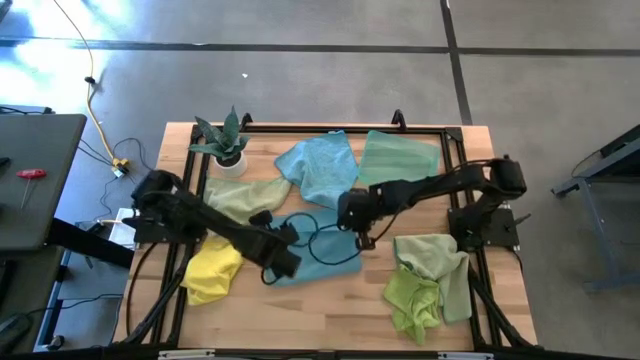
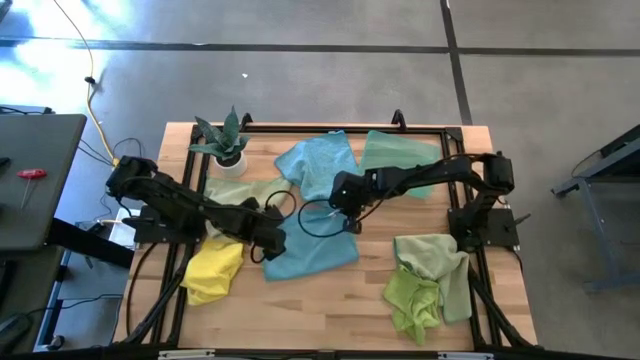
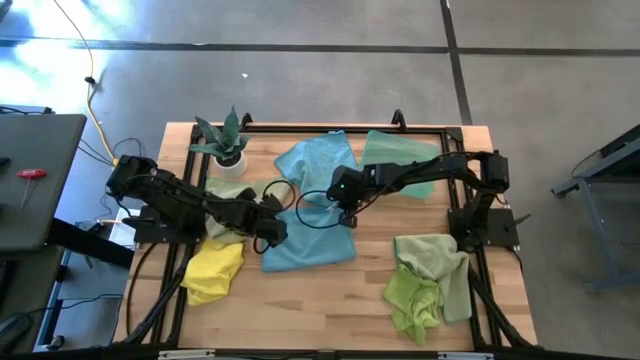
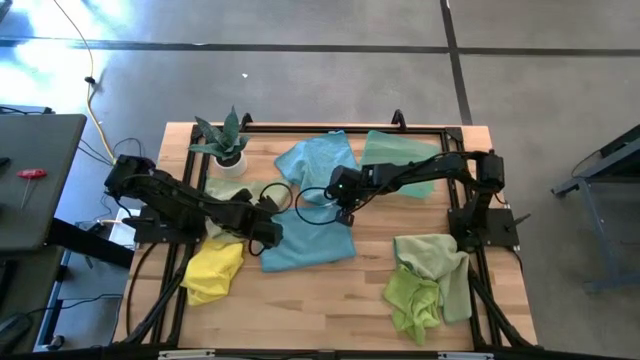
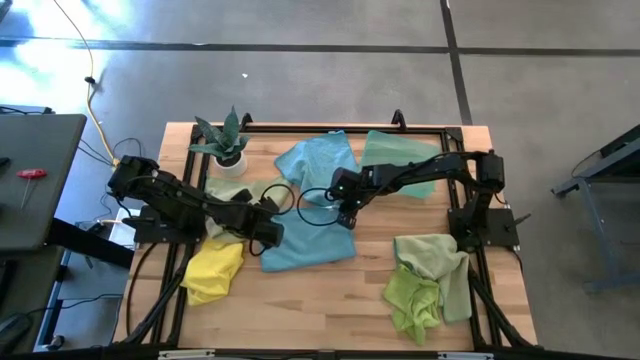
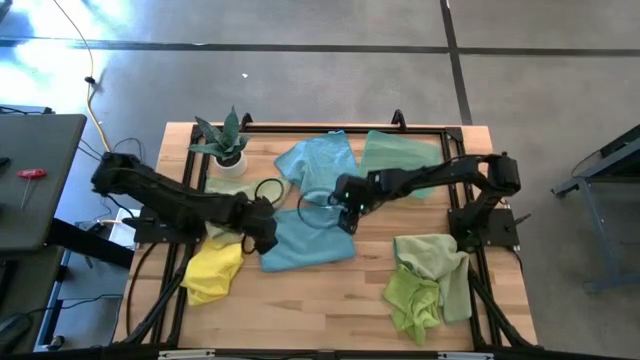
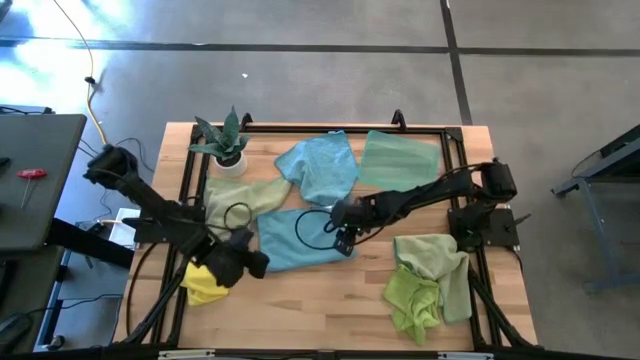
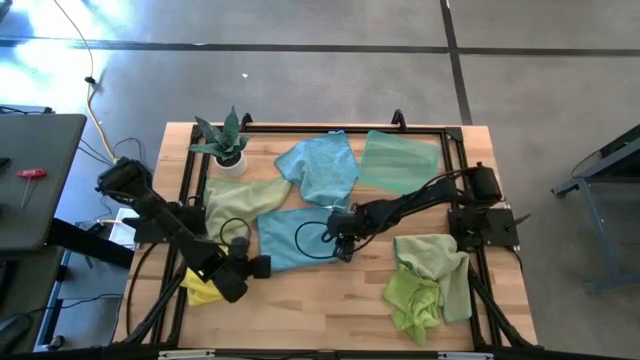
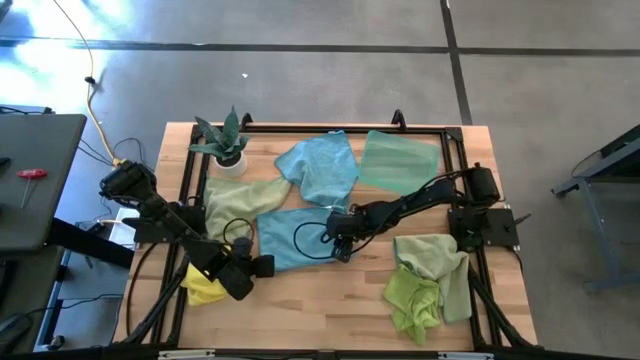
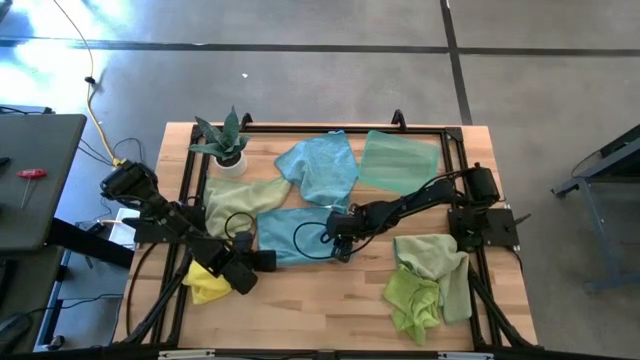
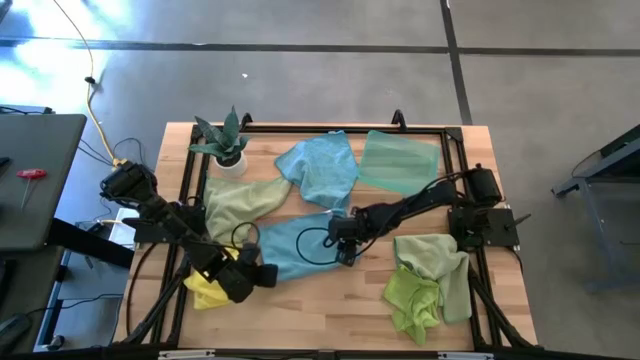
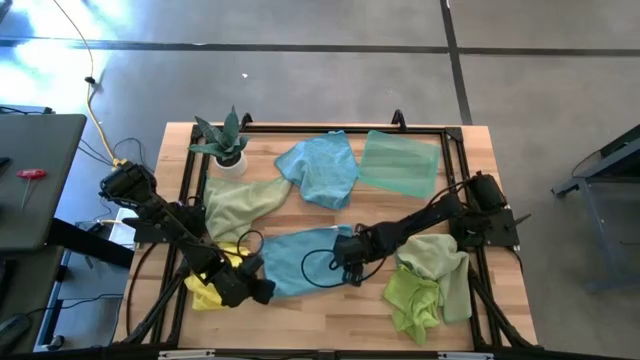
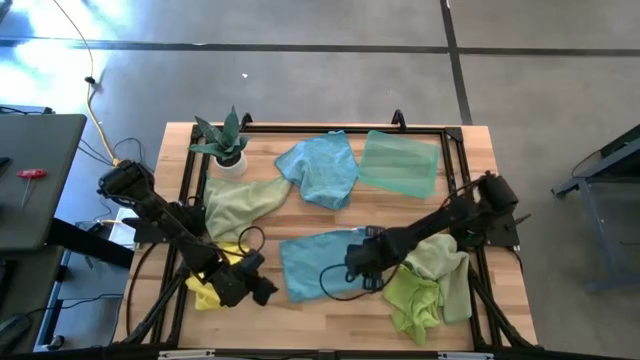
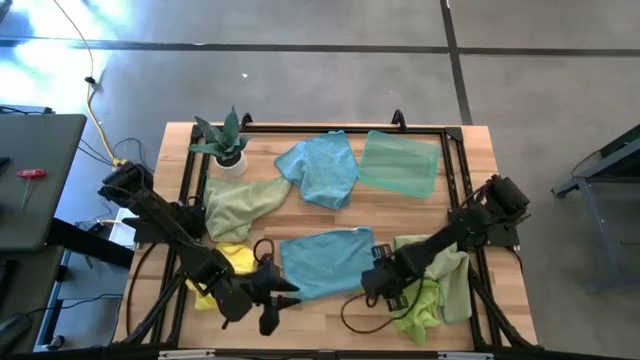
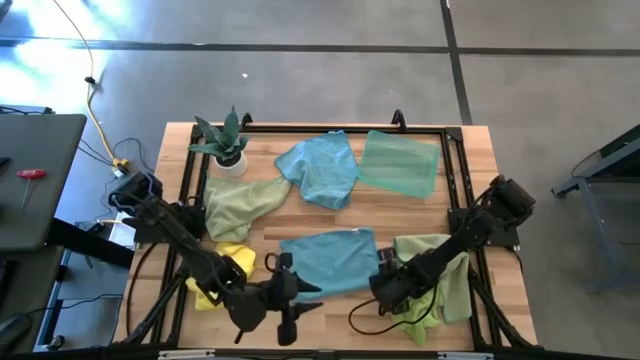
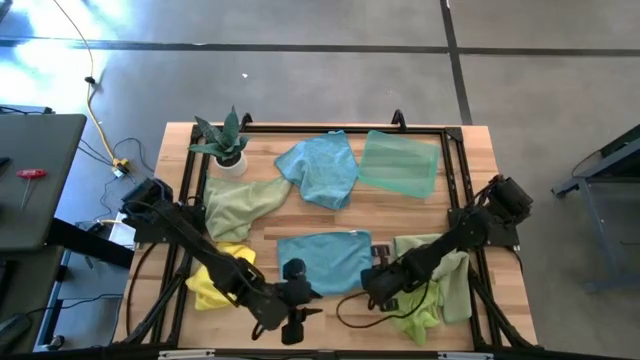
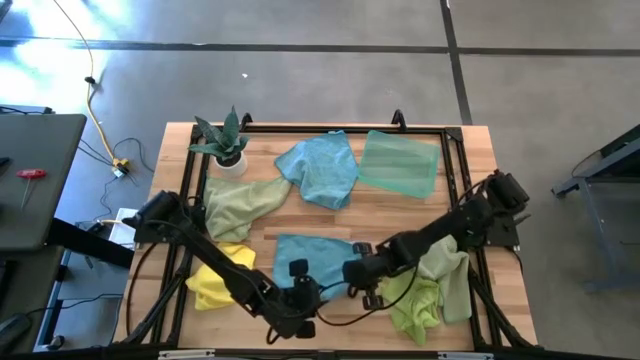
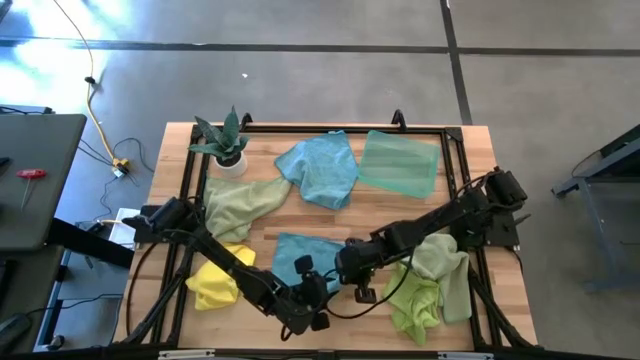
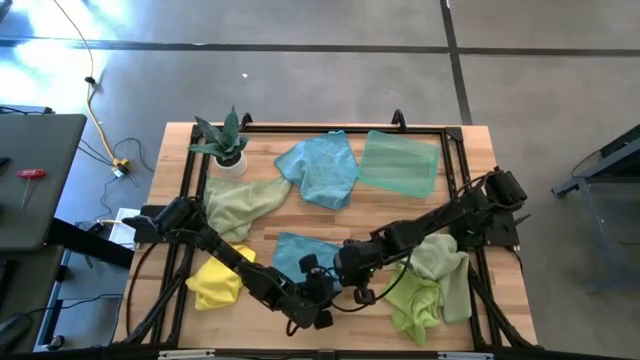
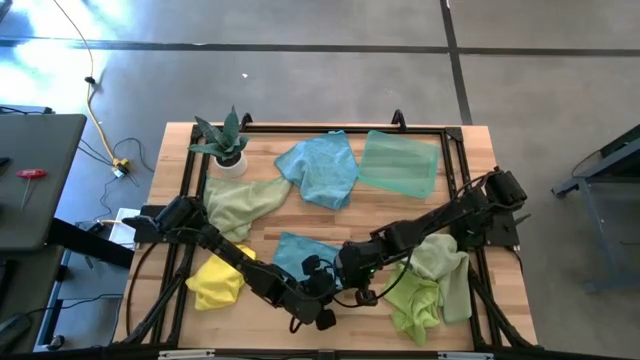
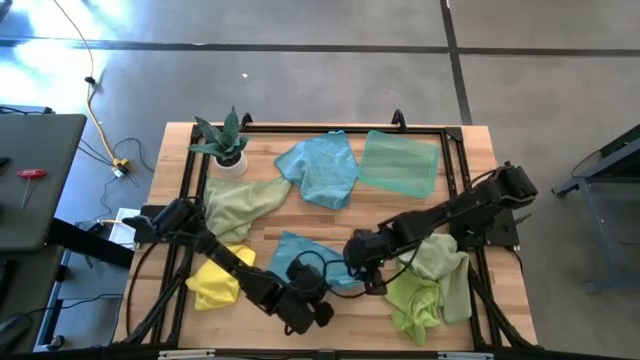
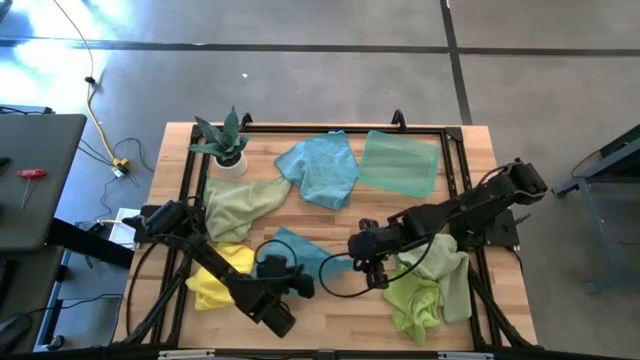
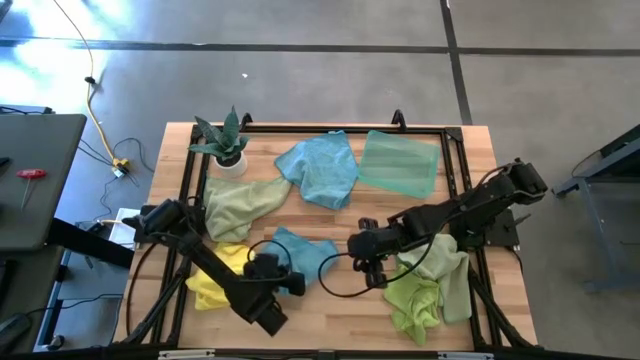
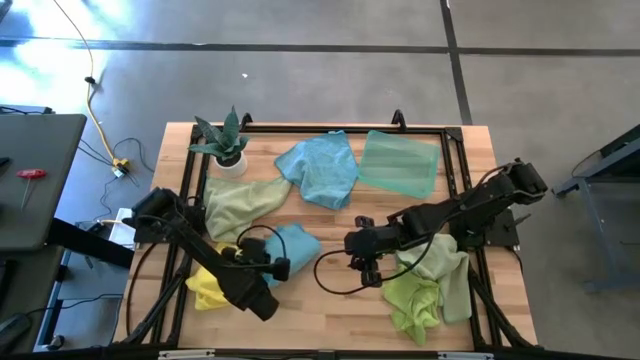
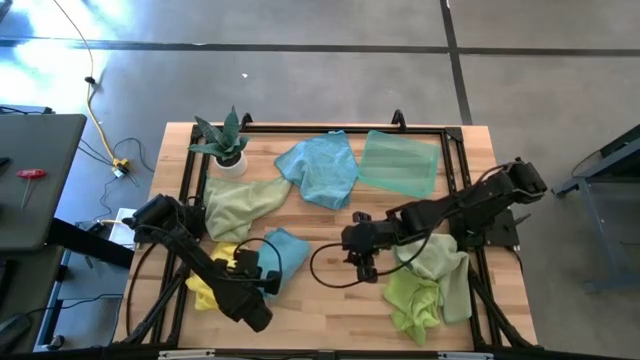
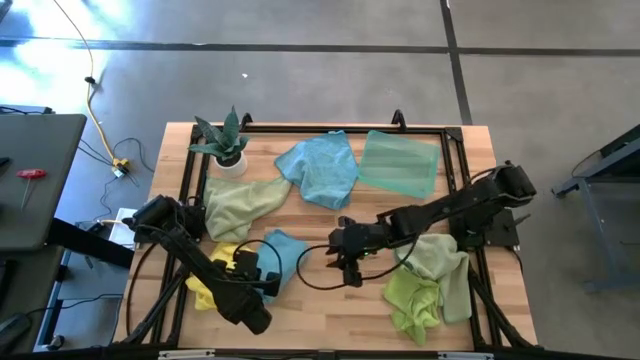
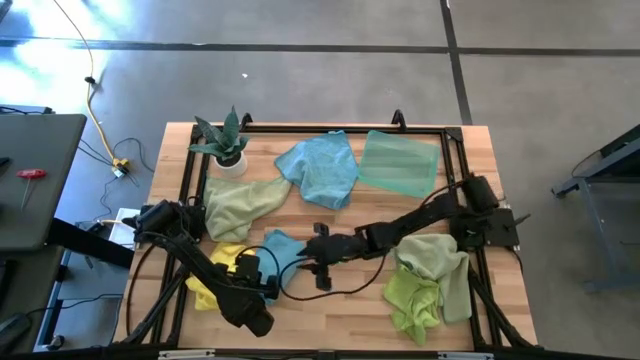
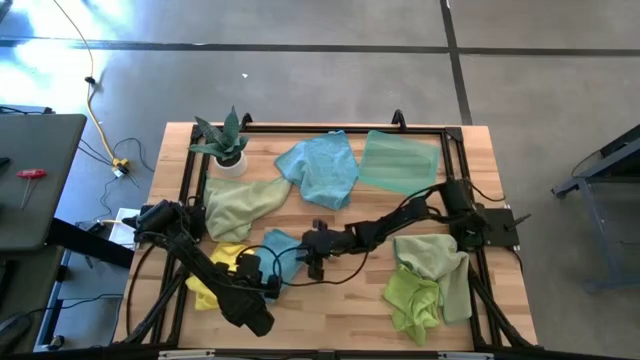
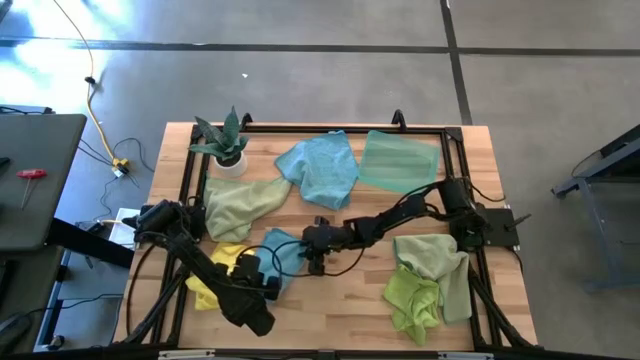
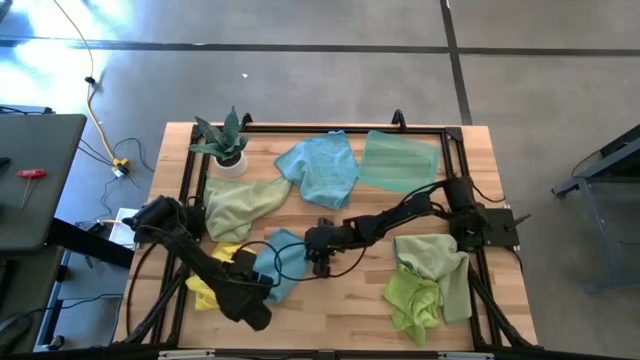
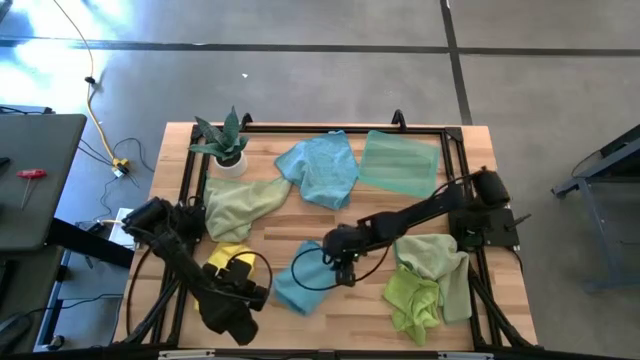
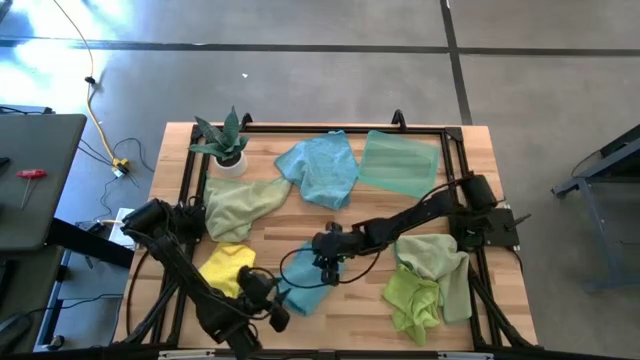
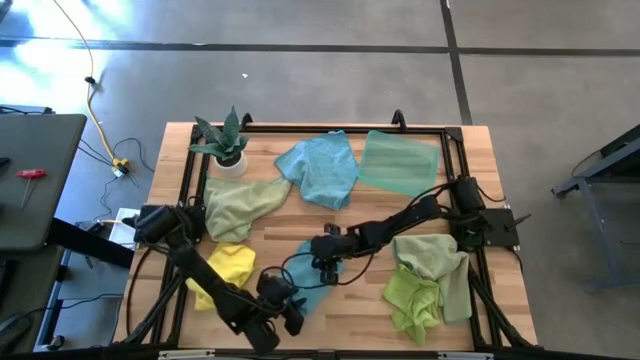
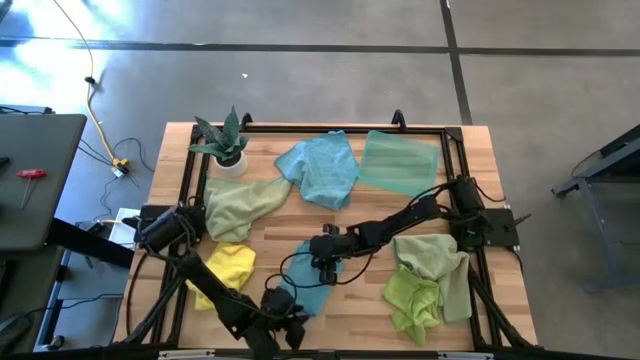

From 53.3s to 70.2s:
Task: Fold microfiber towels
Fold the bottom blue microfiber cloth

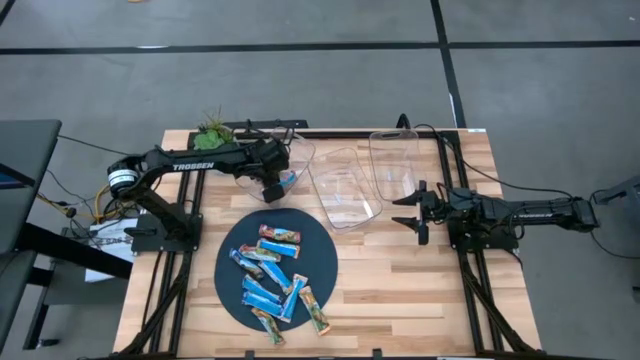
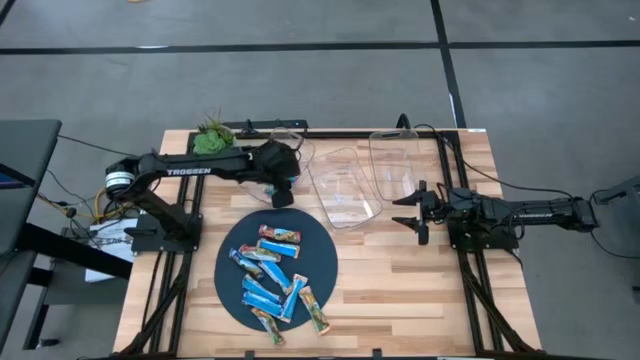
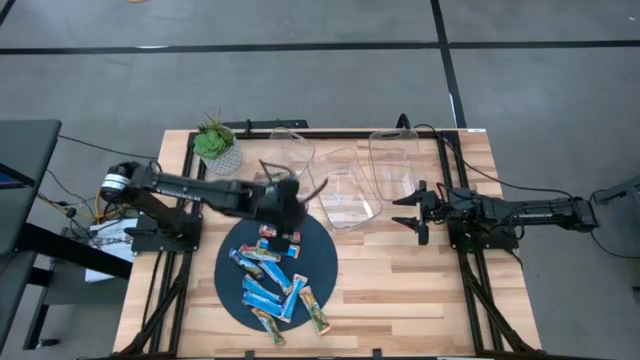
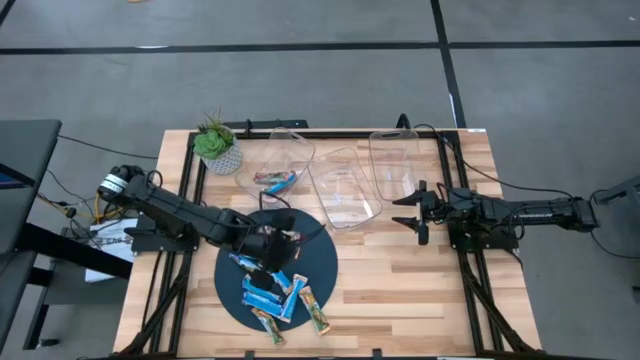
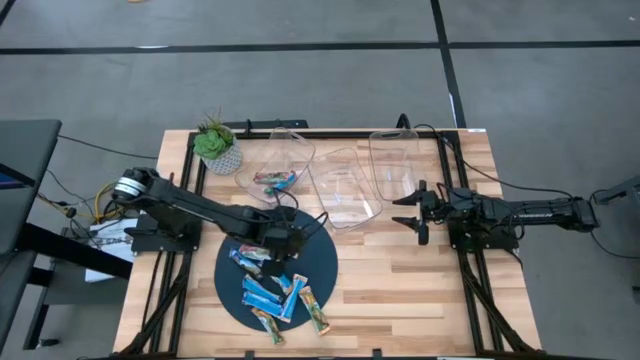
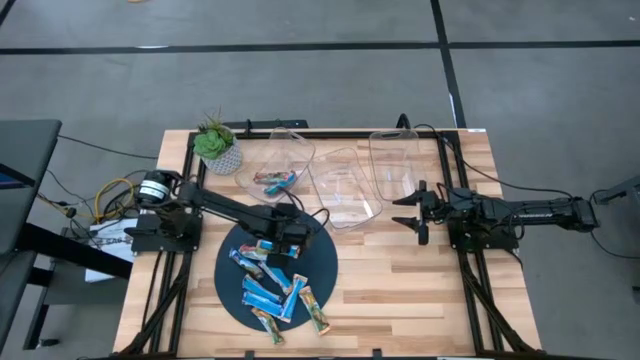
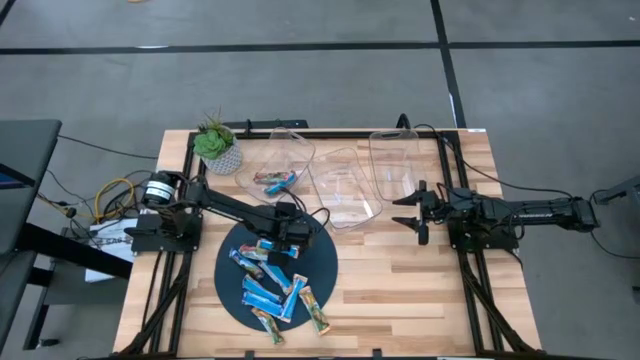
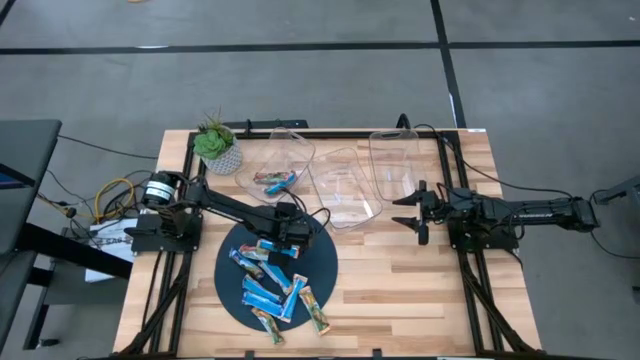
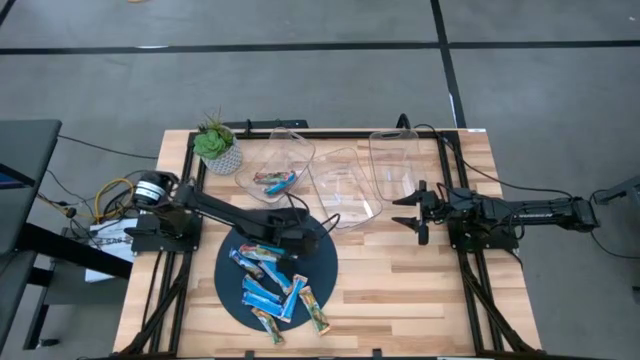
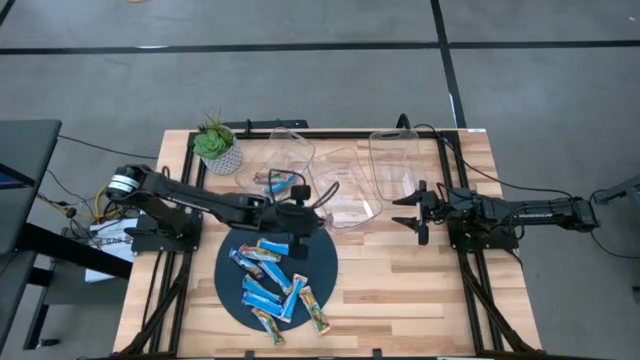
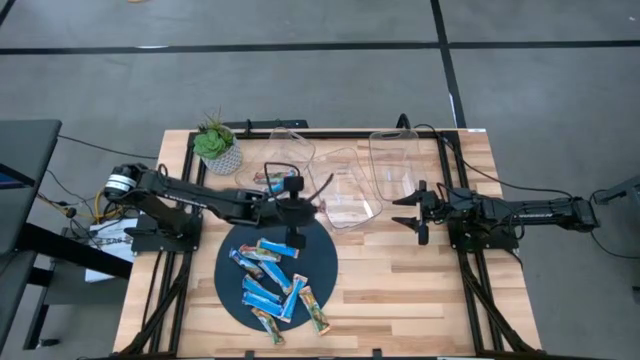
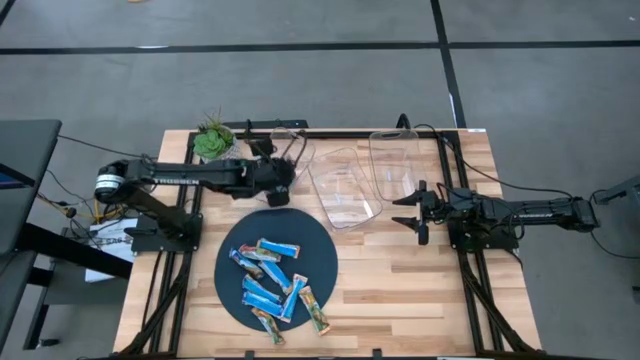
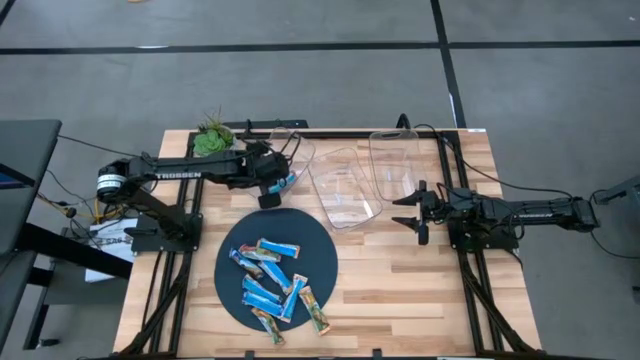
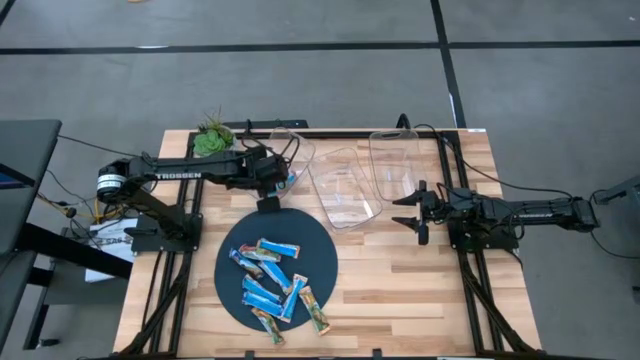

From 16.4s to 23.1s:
Task: Pick and place Granola Bars by type
Put the red granola bar into the left transparent bin
